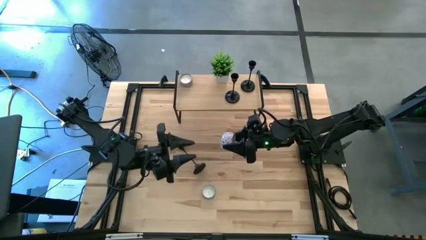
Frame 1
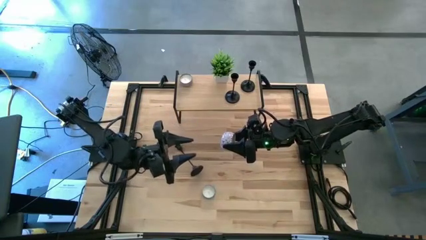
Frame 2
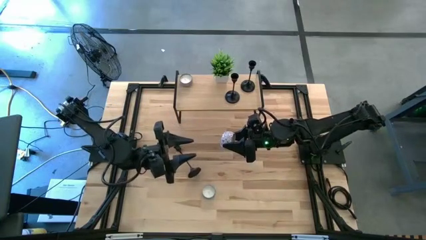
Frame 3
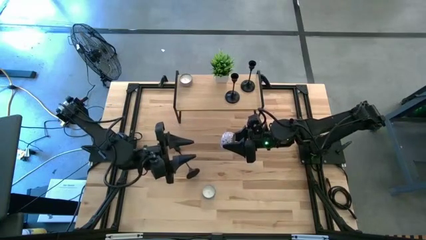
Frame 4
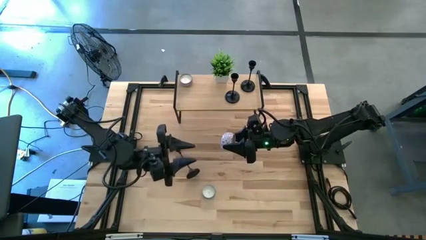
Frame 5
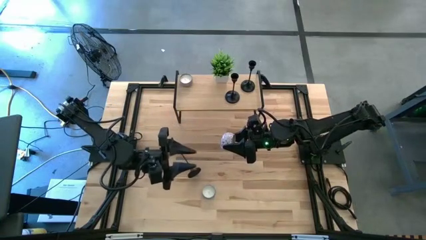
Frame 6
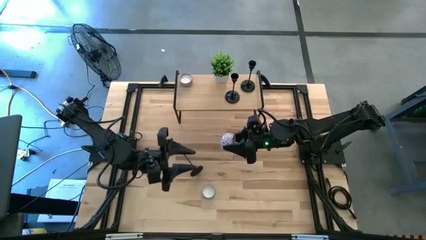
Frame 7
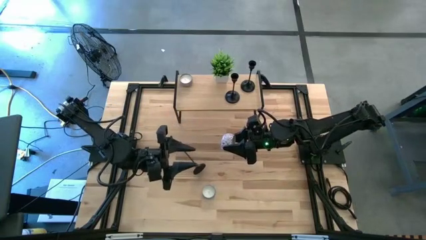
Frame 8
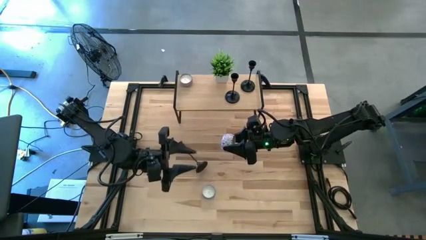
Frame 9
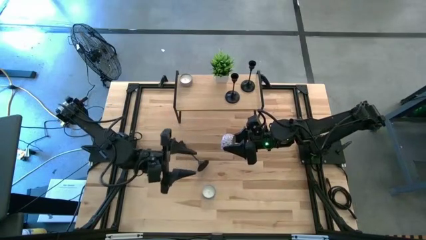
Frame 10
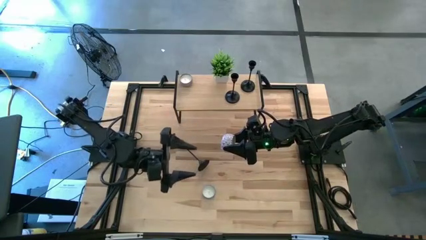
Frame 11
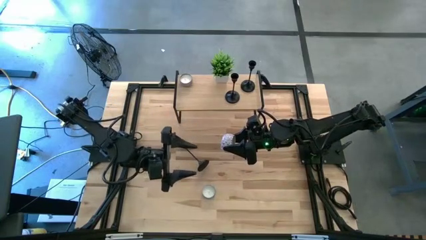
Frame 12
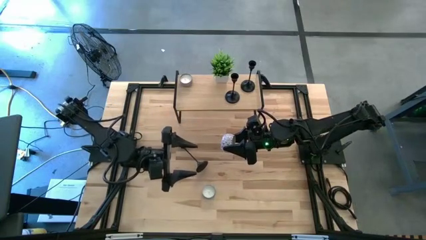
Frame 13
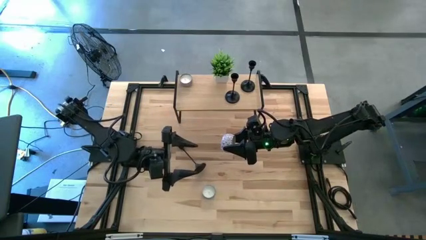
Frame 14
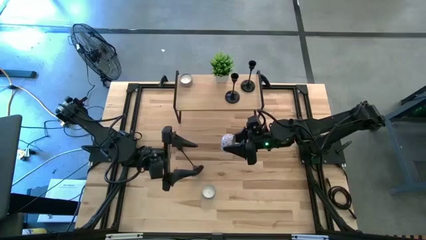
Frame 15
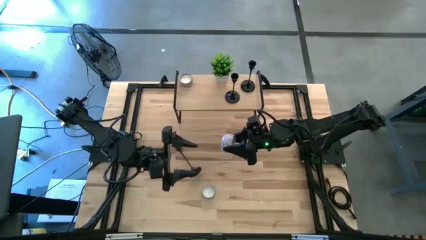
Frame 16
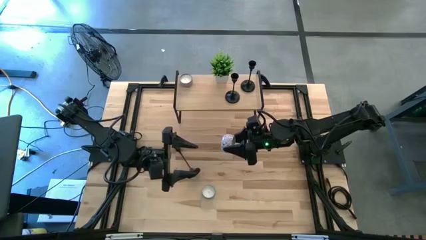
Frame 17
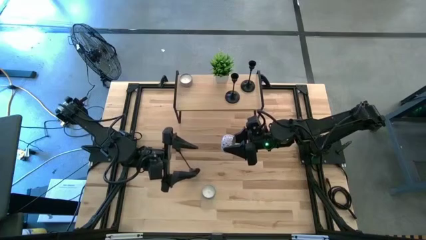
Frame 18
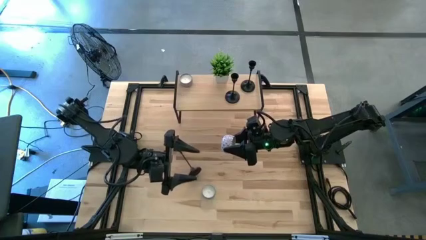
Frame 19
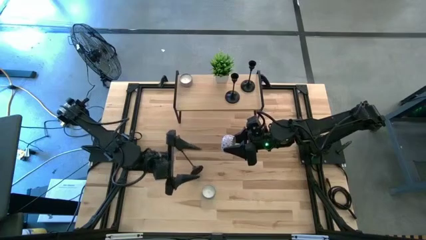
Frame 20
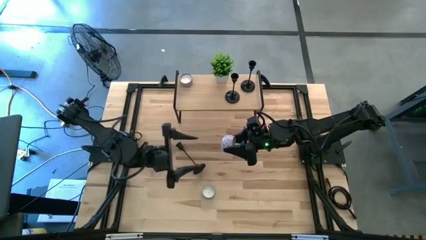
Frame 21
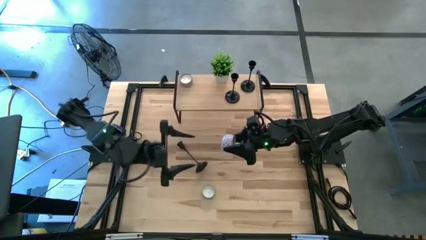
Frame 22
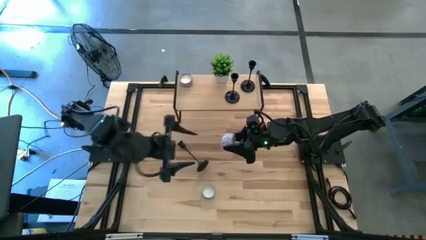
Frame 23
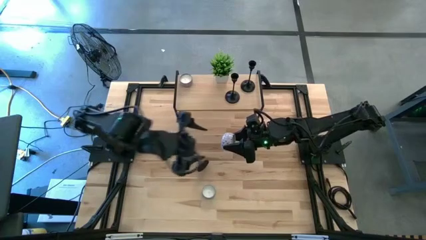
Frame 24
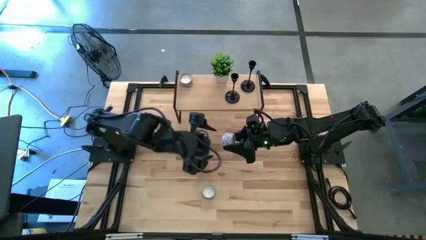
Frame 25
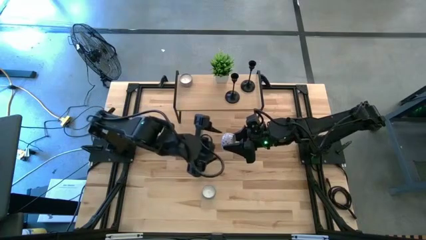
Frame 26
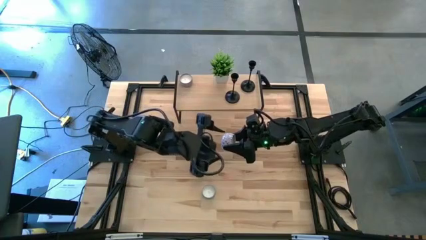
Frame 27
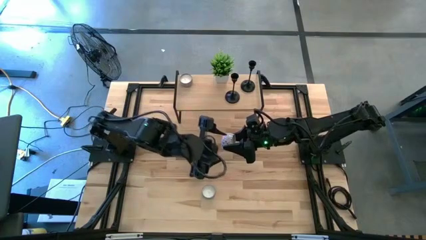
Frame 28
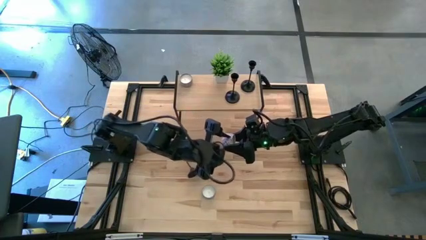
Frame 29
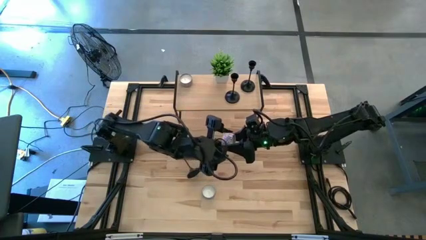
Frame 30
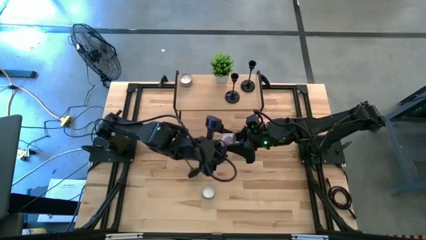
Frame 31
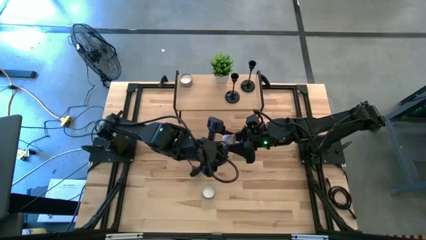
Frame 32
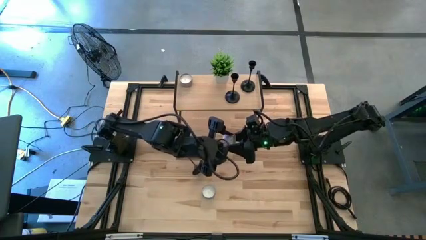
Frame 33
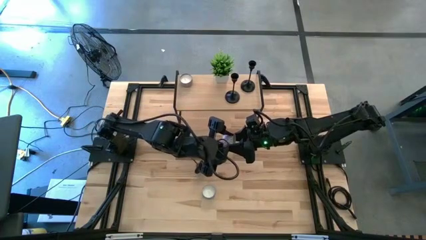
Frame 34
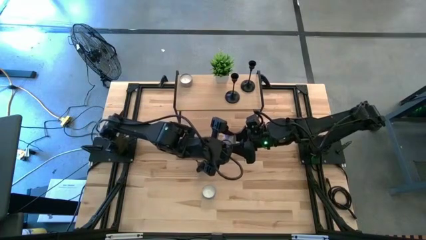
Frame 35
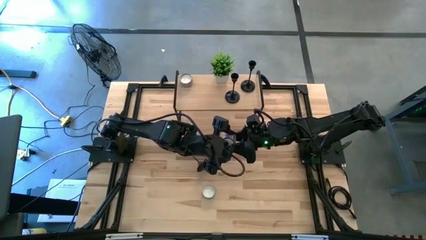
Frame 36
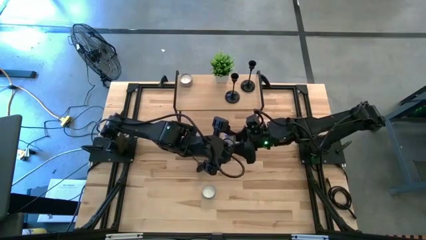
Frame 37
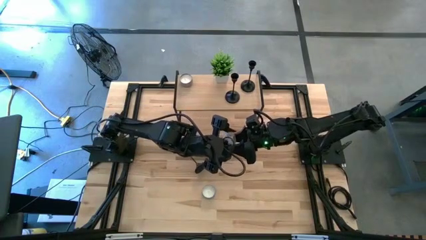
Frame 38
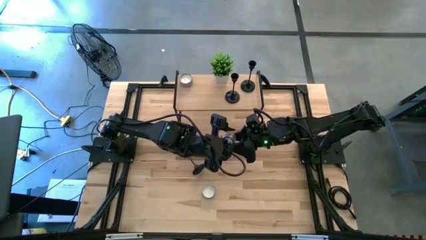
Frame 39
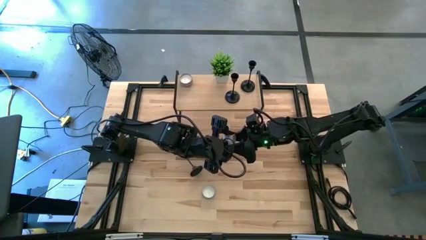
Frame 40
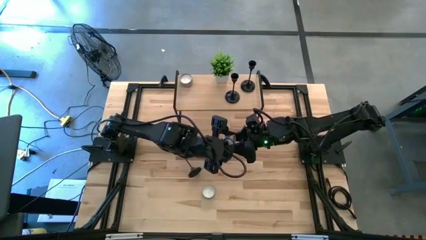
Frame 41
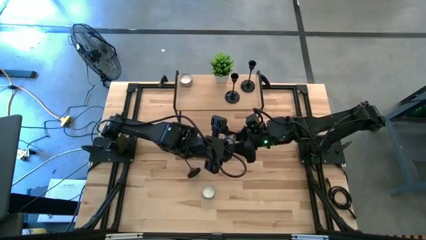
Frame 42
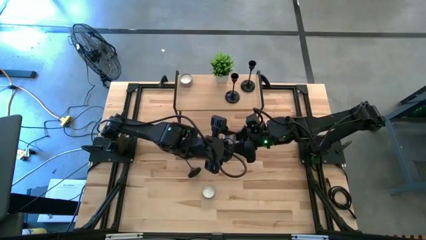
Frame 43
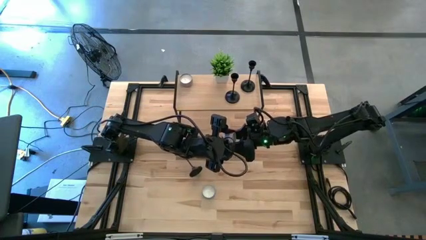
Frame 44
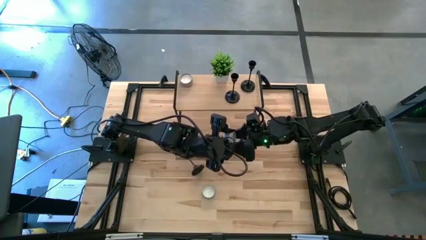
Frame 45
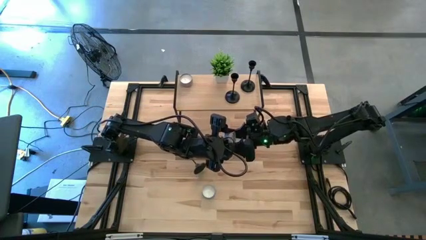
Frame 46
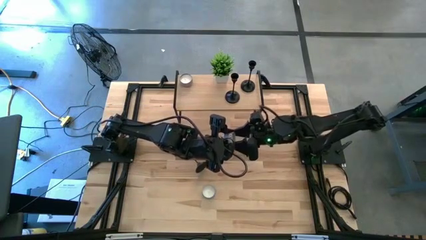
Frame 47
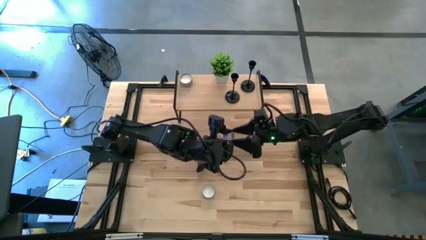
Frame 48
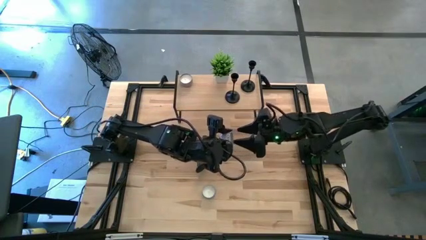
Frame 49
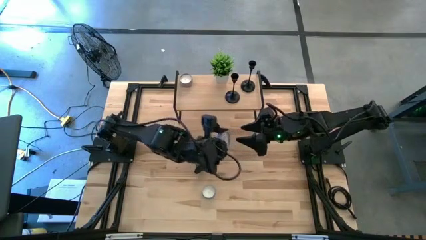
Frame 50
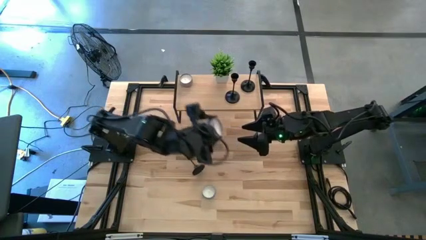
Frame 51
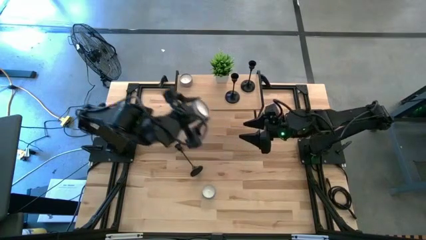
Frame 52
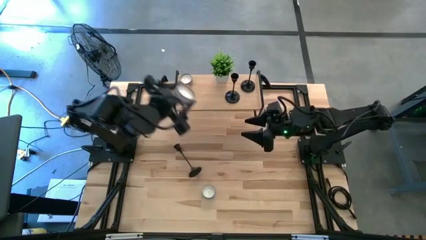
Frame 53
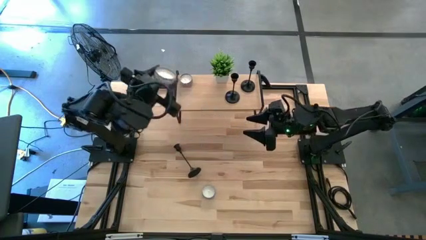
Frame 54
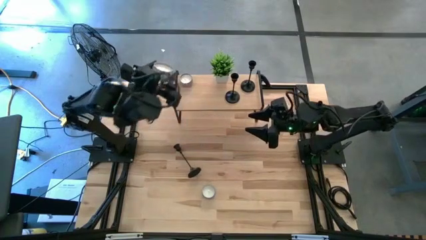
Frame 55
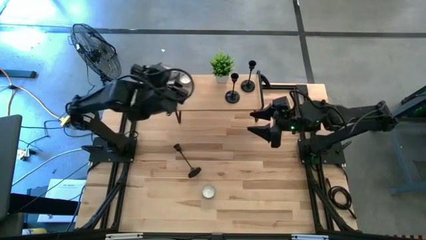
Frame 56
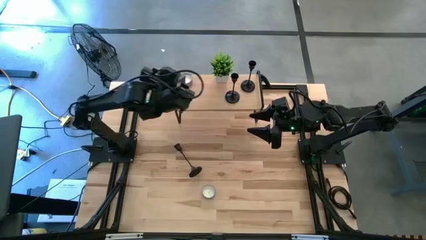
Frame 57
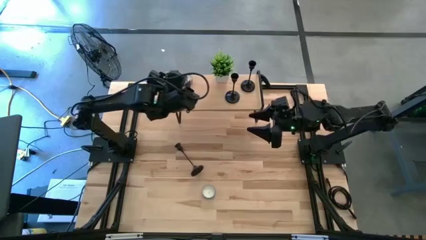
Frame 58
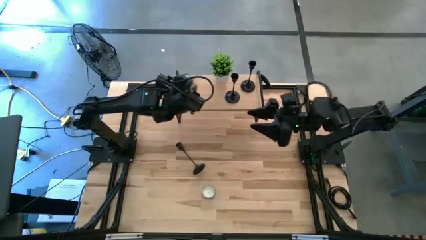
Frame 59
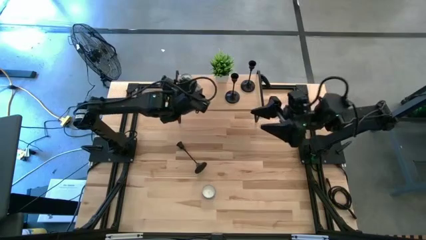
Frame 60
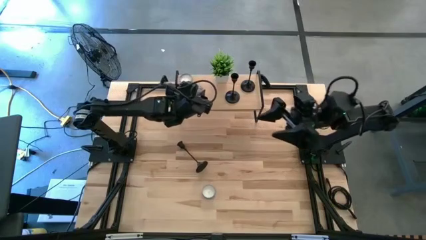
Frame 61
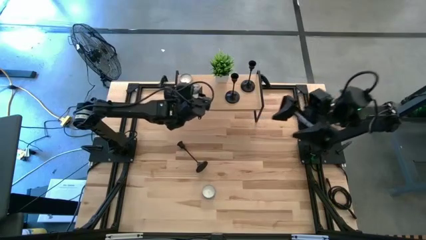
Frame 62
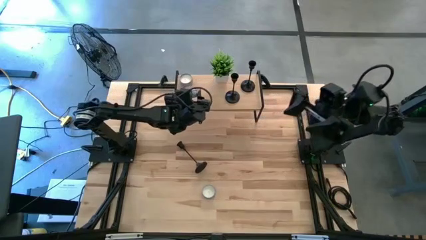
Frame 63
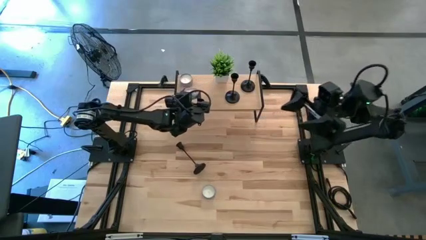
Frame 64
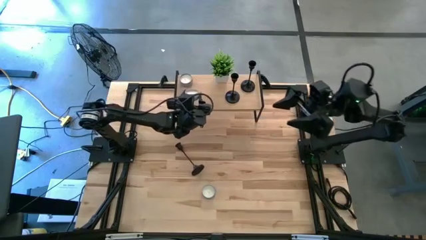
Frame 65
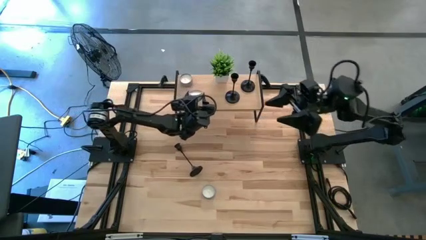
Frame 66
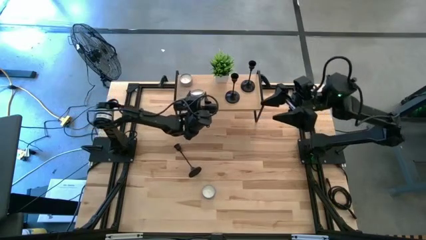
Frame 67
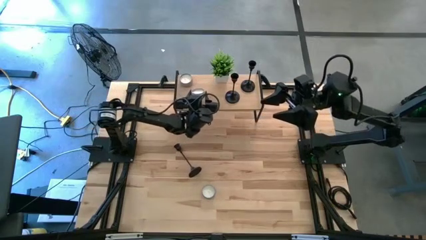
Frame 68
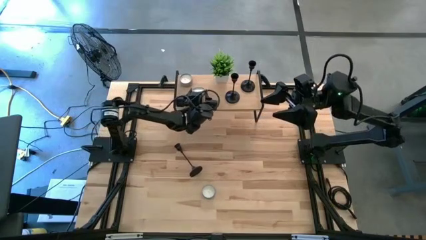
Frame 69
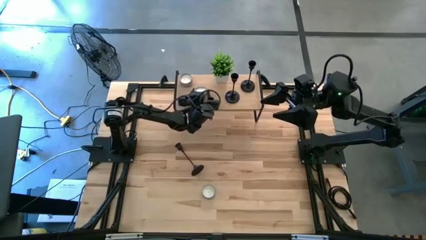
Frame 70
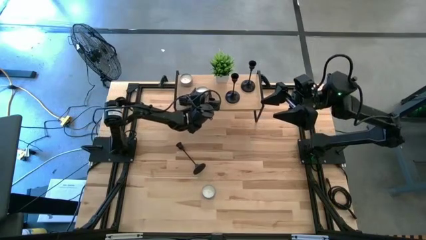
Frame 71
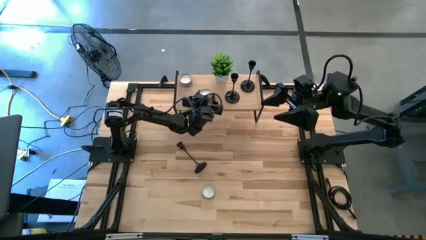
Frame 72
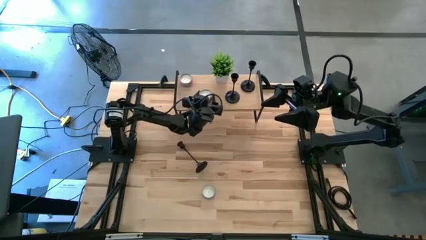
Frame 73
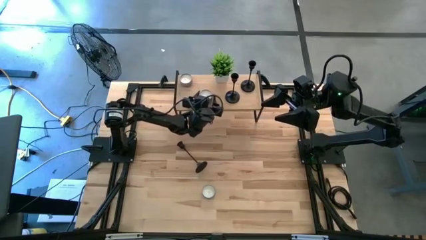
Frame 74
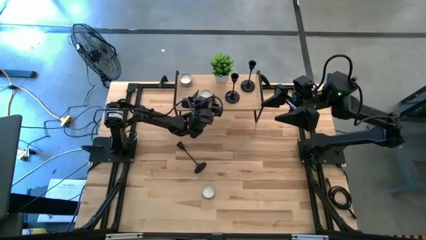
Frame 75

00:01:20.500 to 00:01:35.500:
Task: Pick & Place candle stick holders
Put the white red scented candle on the shelf
